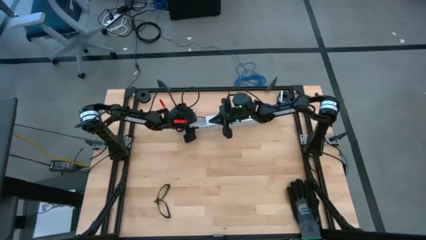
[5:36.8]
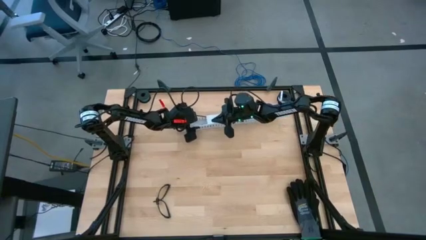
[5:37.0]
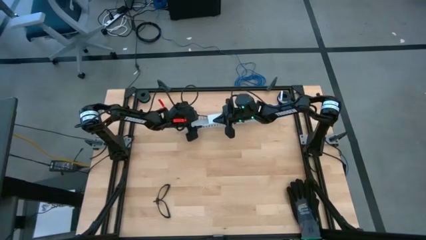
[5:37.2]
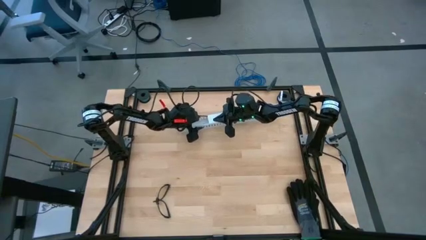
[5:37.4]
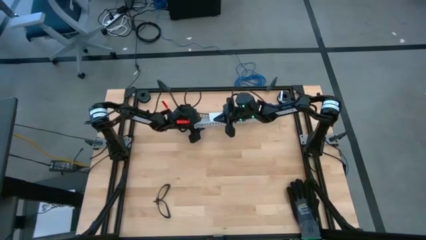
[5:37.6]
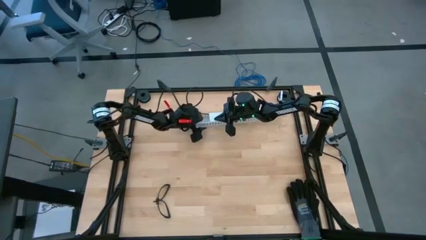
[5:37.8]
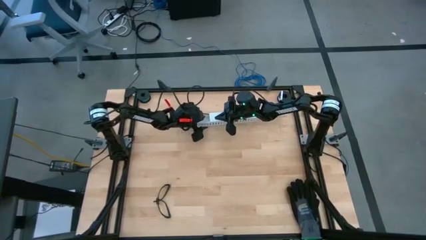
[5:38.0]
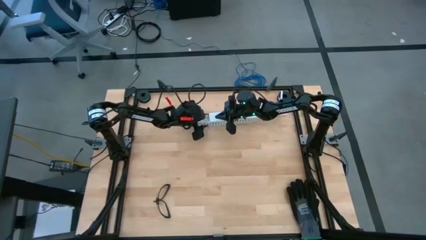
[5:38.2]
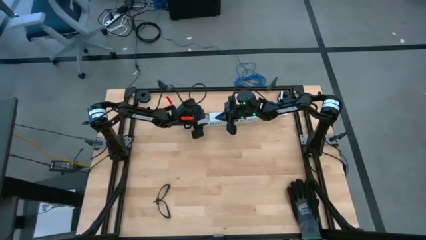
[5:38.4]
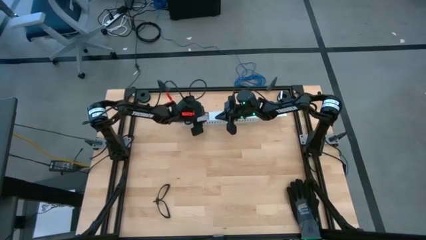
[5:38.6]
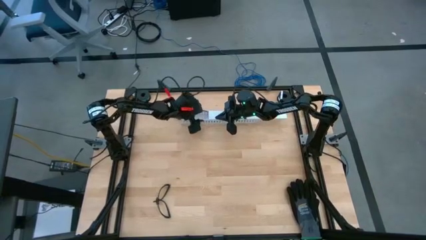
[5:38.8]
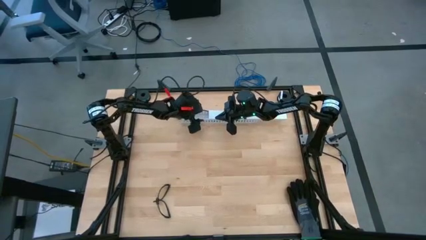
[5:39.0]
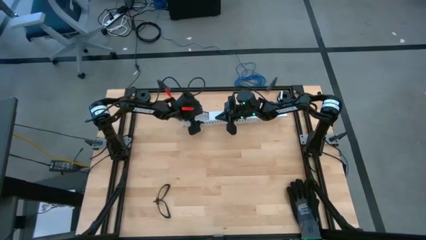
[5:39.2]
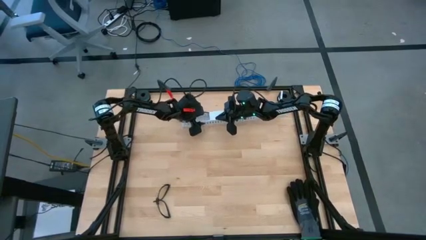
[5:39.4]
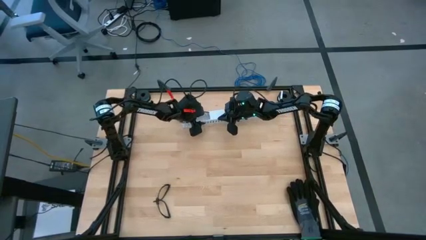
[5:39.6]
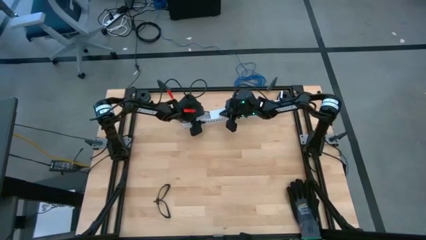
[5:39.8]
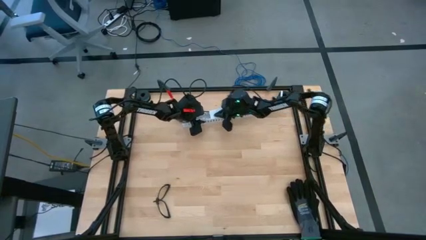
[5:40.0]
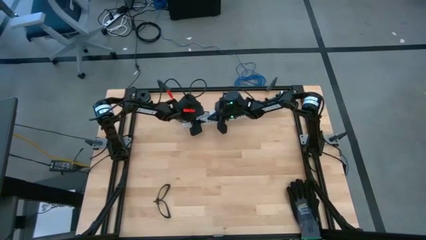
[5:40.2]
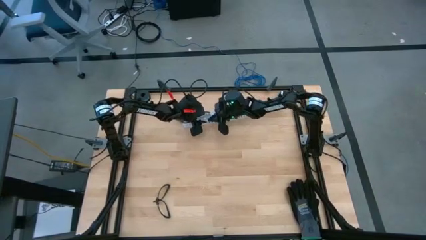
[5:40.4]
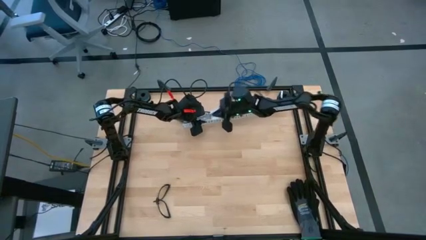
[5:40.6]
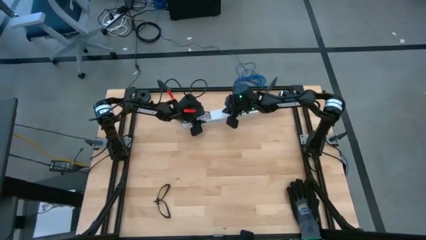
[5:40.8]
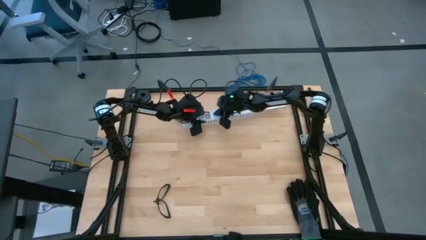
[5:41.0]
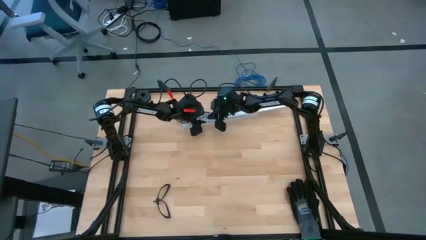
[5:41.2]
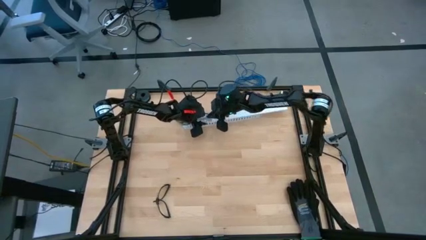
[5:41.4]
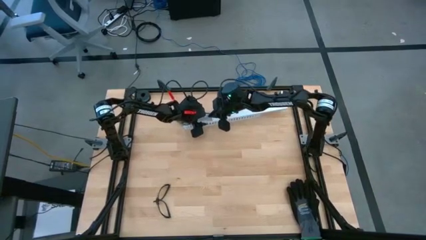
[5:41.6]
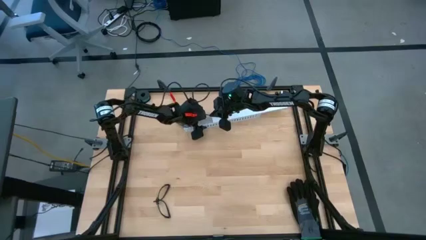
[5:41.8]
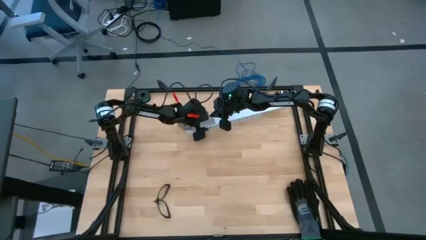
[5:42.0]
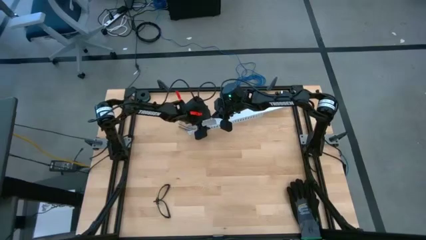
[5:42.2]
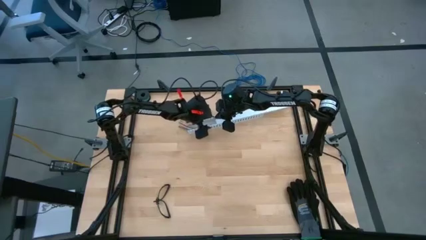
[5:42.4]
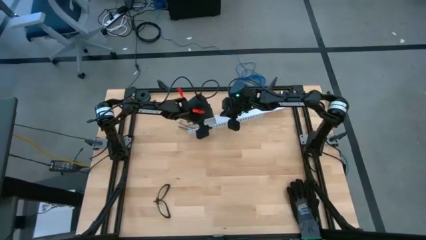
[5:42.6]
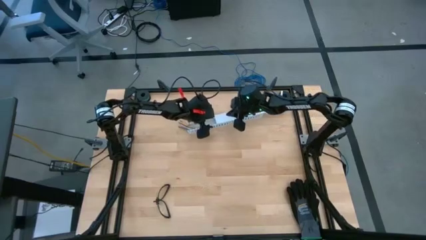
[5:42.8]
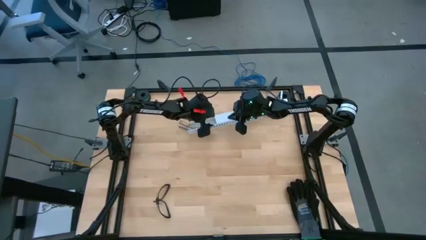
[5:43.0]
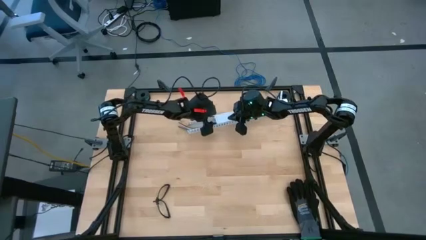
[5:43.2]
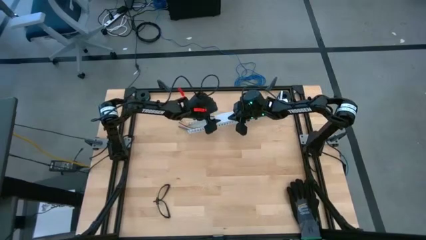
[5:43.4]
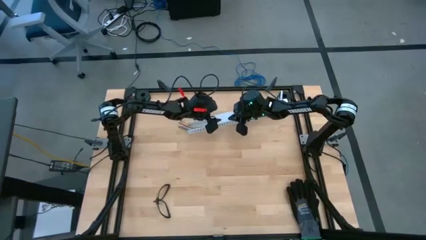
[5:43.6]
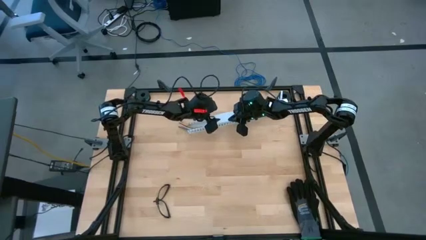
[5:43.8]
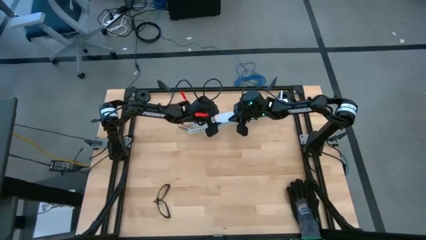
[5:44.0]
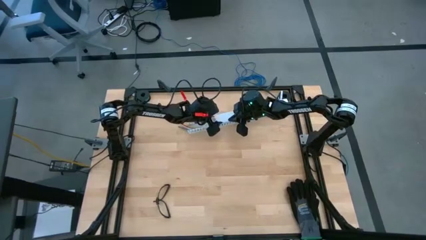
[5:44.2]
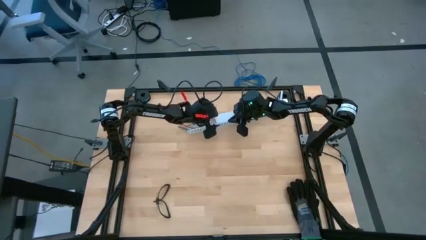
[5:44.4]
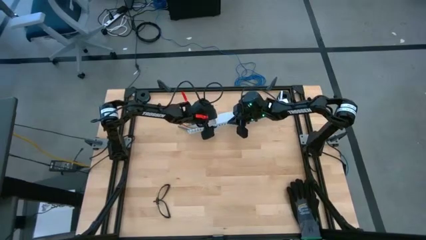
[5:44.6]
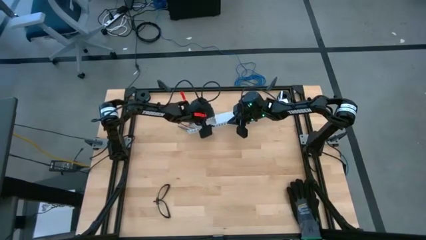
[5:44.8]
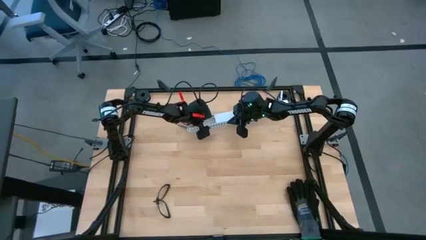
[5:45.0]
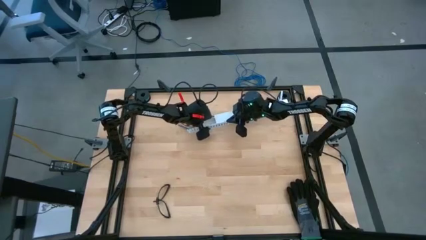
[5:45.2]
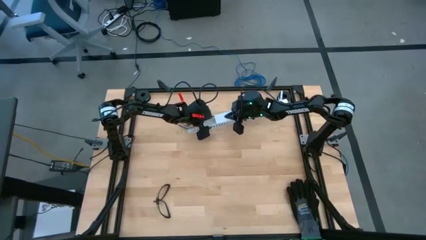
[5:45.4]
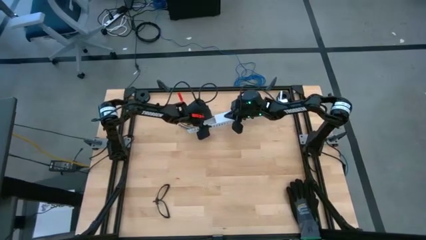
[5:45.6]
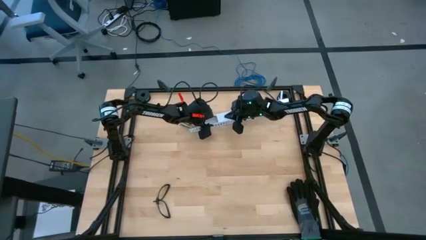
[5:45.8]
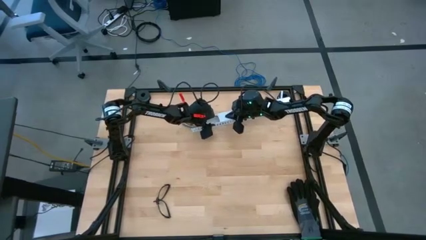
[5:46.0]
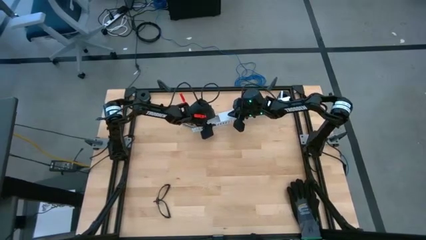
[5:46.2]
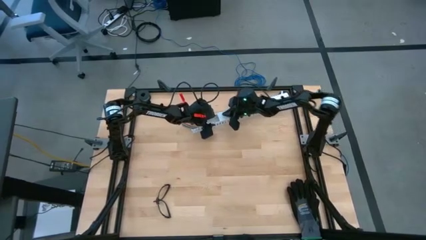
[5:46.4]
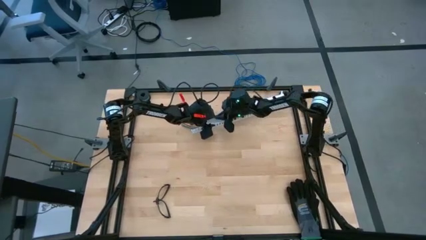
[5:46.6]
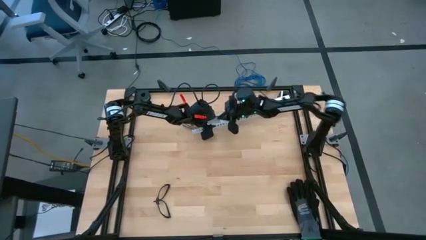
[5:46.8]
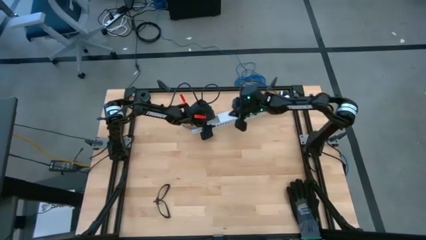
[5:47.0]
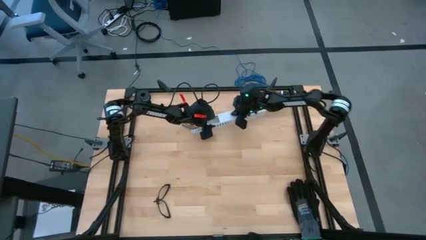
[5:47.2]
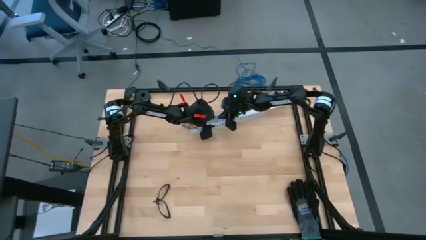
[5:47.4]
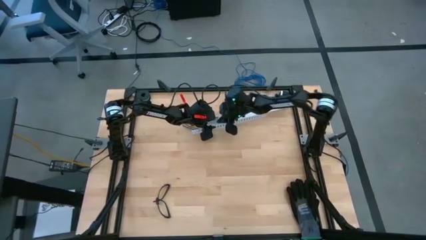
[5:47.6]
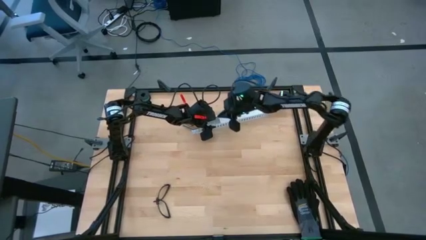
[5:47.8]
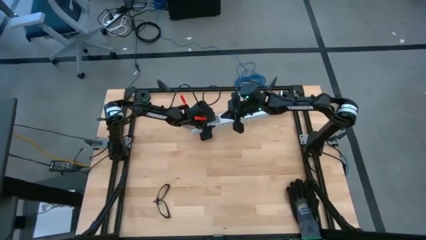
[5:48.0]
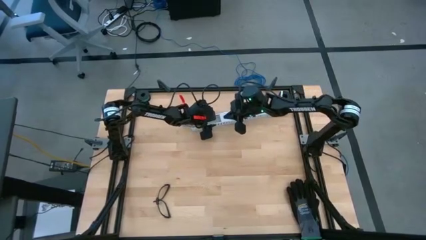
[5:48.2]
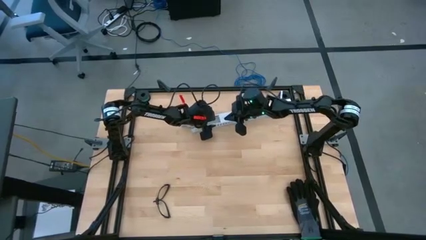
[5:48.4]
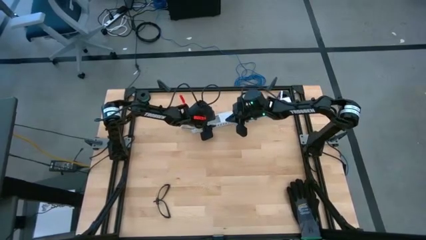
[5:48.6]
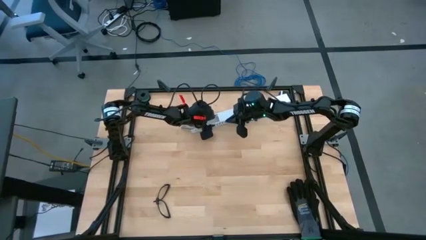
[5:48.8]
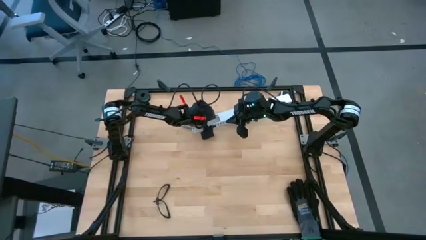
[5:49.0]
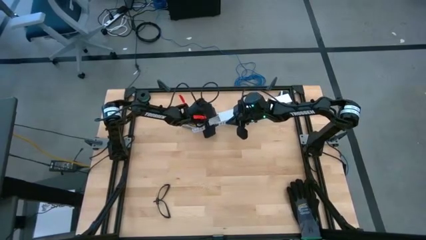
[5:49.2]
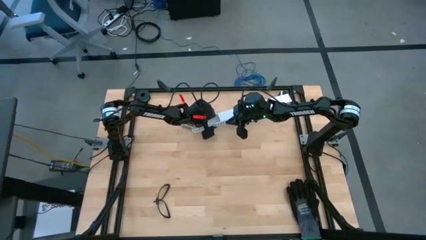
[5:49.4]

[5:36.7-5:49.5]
Task: Ziptie cables
Close the white cable duct lid
